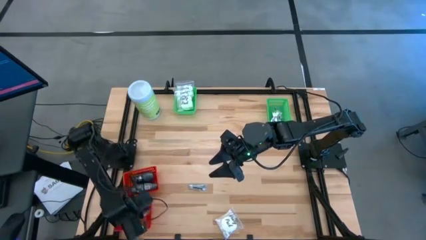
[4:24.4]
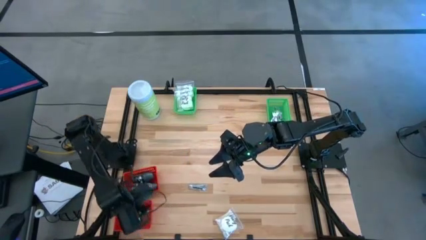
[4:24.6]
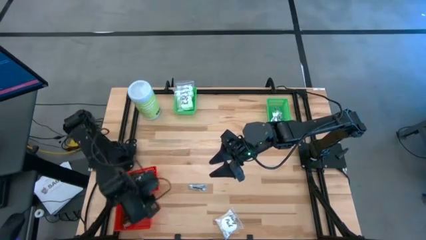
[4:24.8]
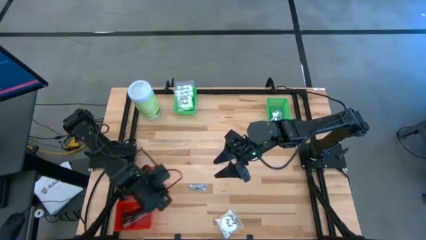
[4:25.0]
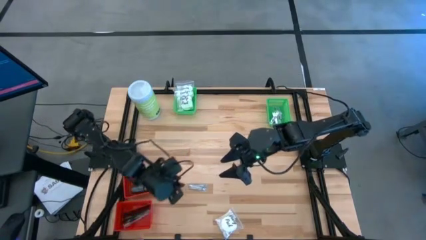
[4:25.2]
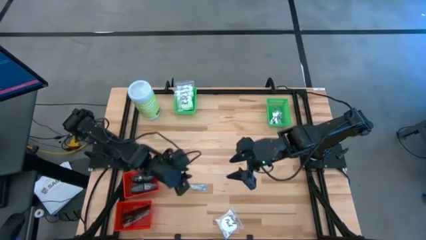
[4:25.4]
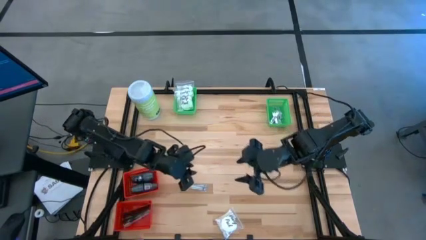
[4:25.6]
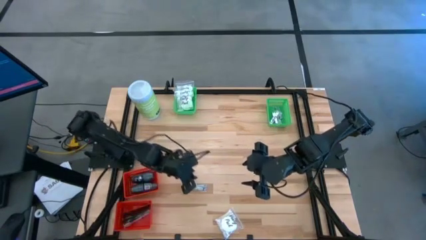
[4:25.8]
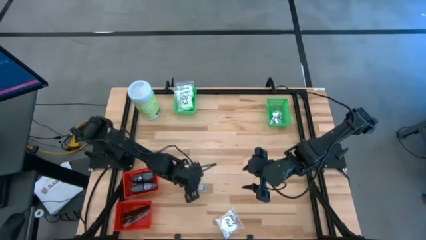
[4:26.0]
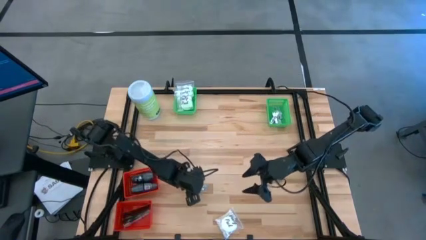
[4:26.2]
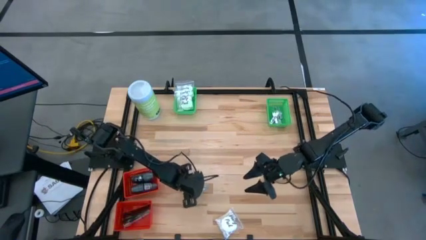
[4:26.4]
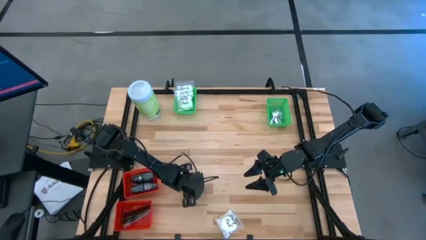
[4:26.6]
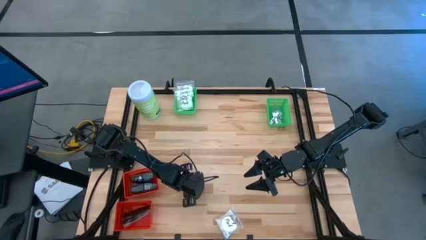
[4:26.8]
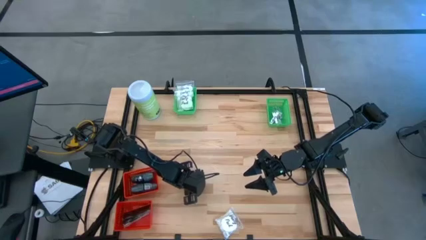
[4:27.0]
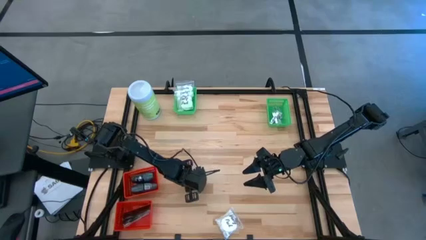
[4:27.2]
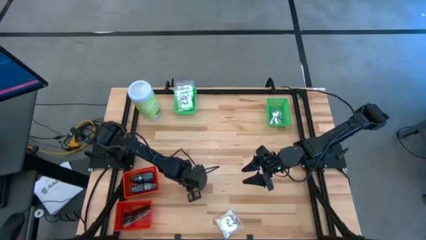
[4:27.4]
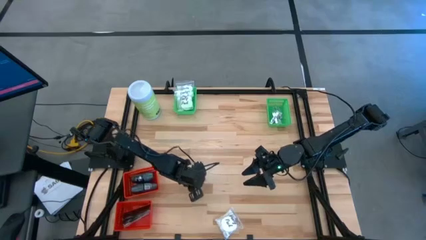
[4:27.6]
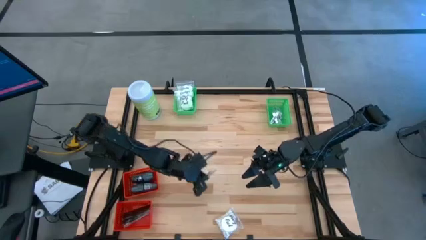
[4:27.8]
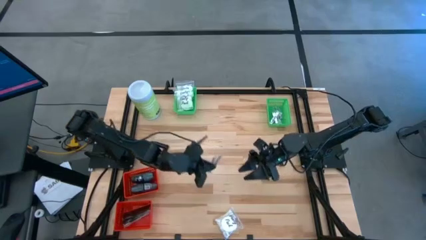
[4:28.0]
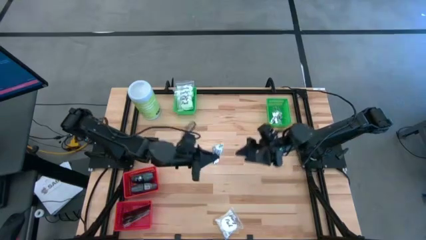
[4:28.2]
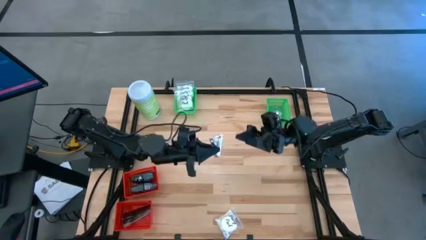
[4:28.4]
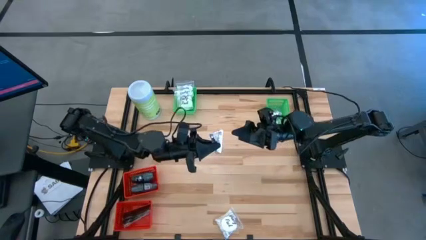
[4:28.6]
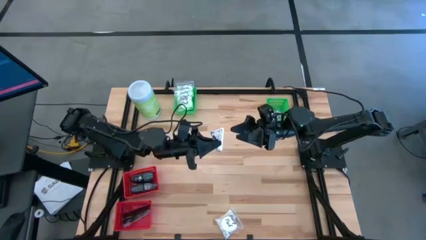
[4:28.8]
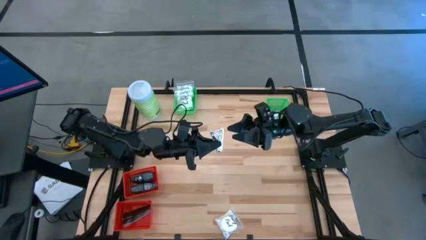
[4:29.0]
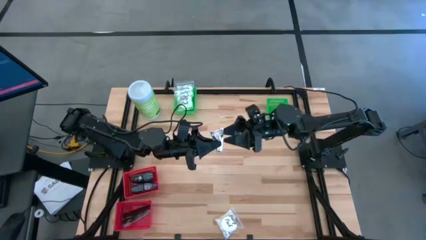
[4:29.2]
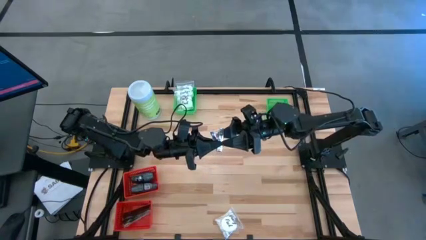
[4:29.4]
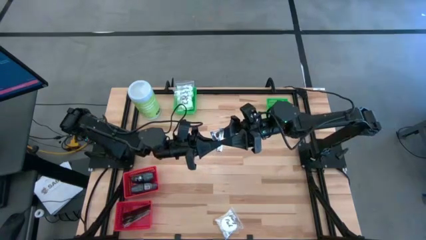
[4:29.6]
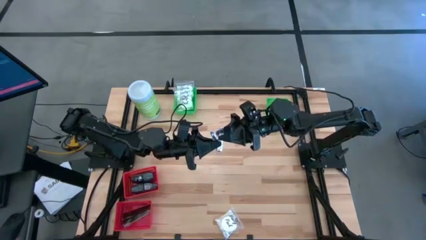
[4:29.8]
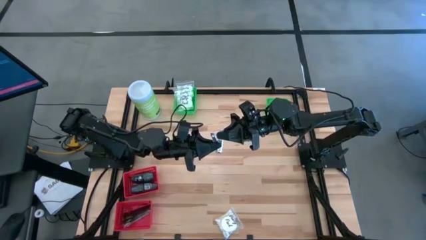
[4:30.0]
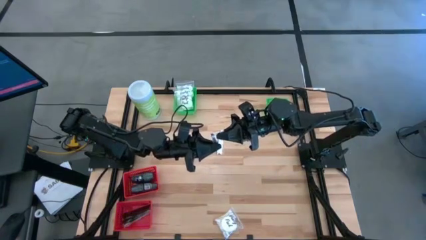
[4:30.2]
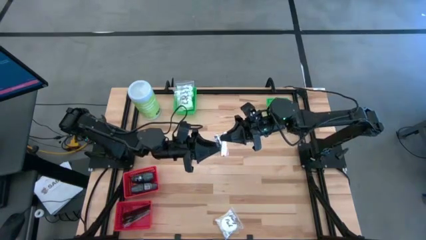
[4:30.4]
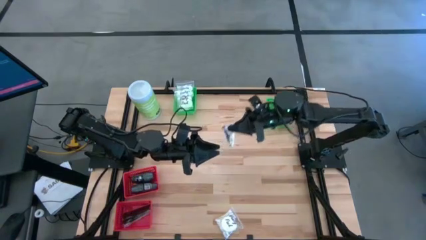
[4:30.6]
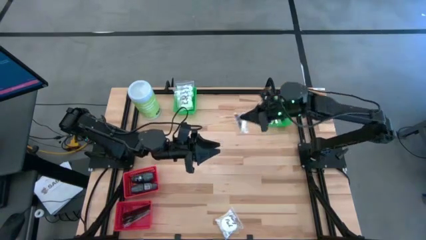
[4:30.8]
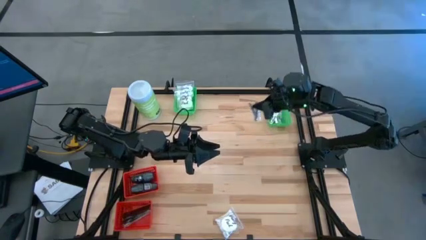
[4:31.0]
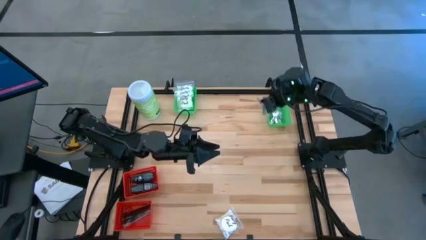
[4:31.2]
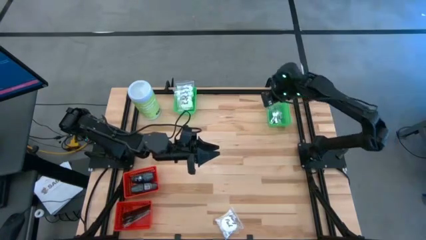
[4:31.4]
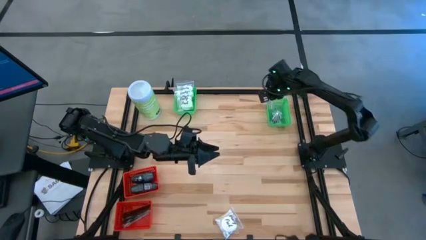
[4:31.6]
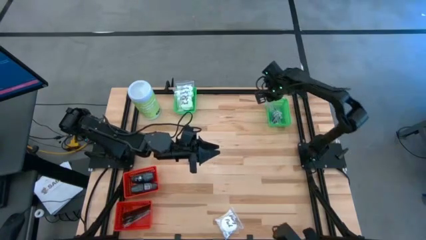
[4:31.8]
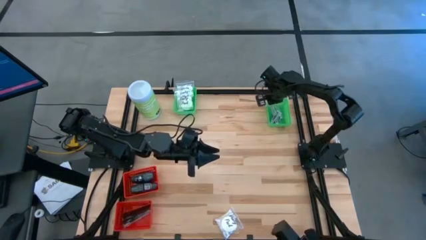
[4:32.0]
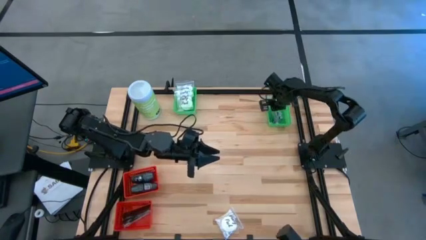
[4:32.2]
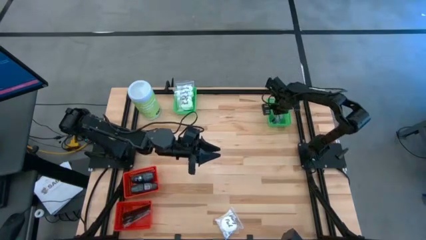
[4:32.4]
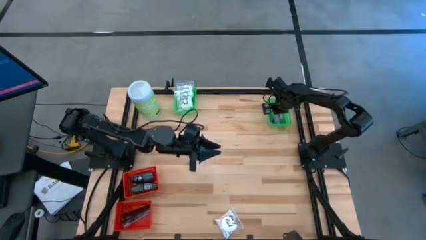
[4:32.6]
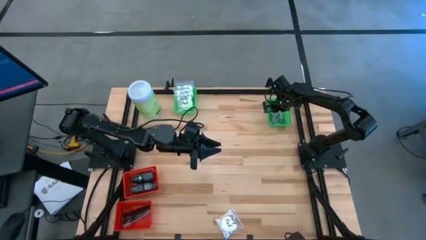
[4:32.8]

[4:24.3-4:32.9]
Task: Pick & Place Travel size toiletries
Put the silver nail cutter into the top right green basket

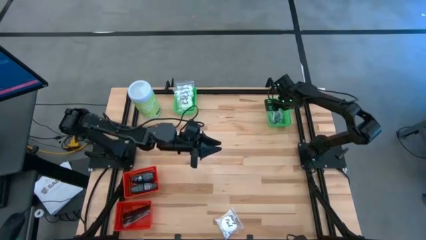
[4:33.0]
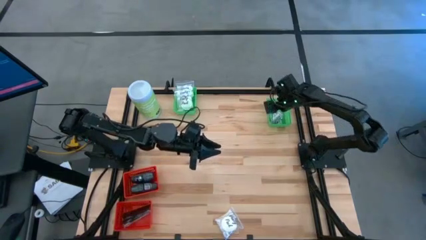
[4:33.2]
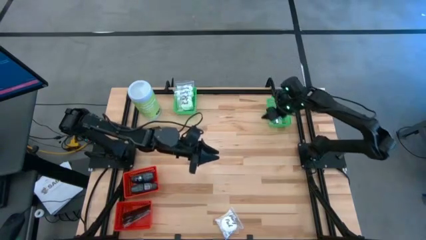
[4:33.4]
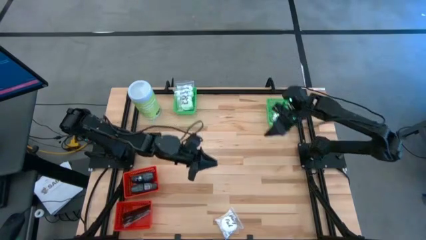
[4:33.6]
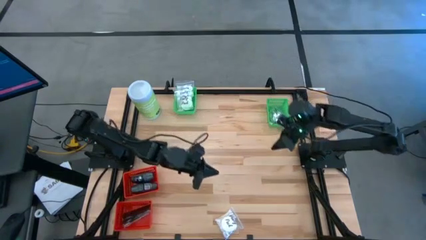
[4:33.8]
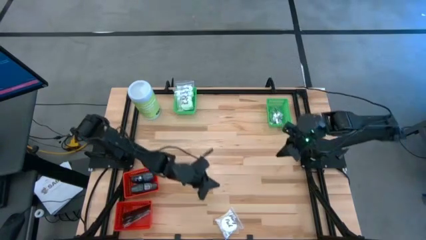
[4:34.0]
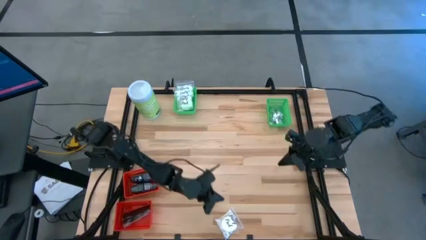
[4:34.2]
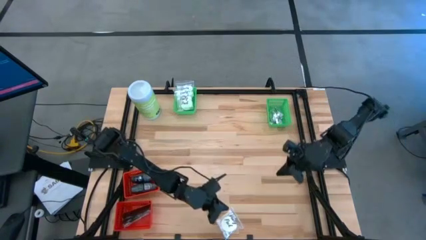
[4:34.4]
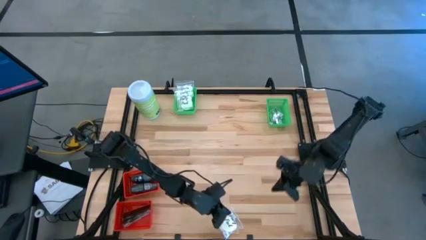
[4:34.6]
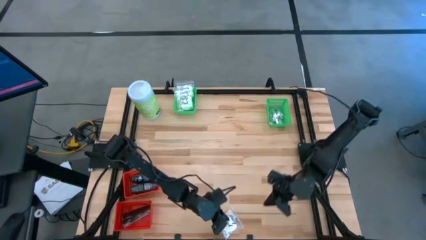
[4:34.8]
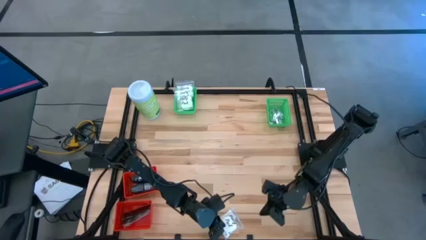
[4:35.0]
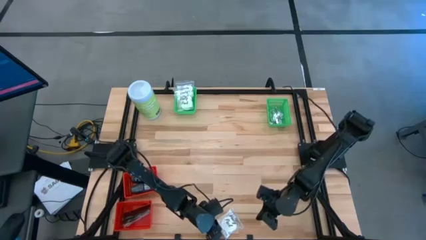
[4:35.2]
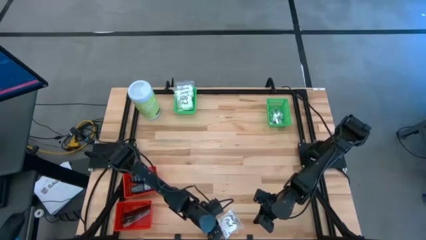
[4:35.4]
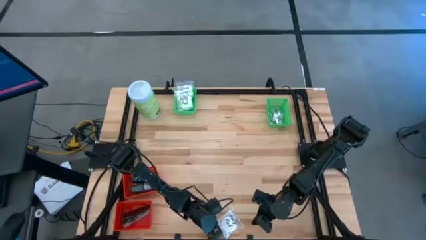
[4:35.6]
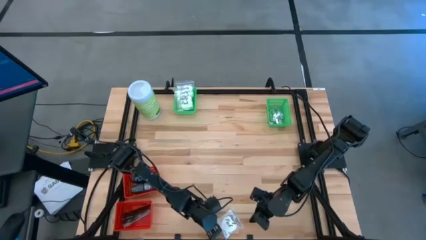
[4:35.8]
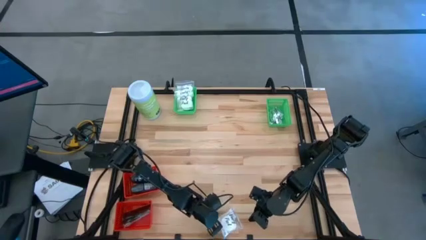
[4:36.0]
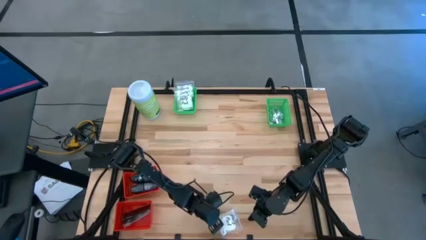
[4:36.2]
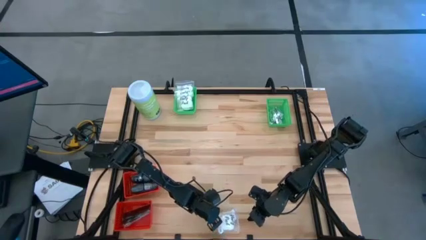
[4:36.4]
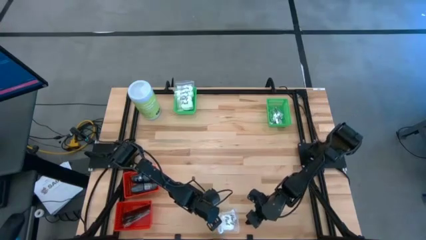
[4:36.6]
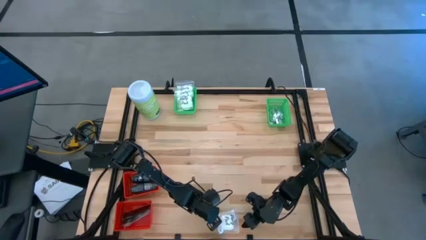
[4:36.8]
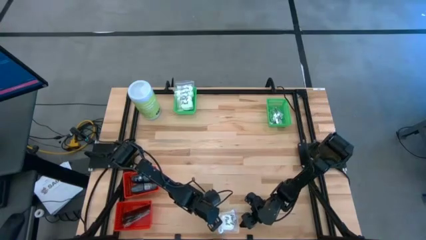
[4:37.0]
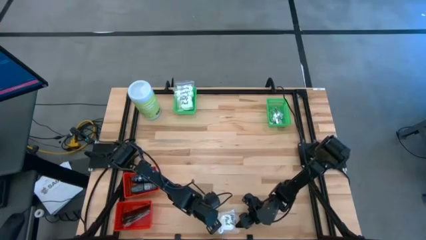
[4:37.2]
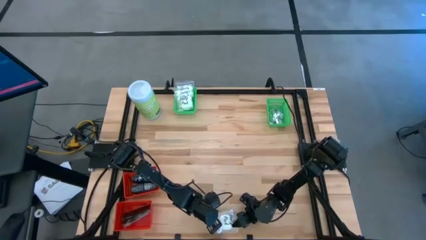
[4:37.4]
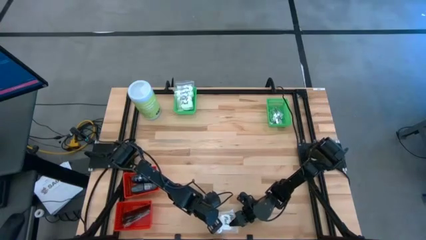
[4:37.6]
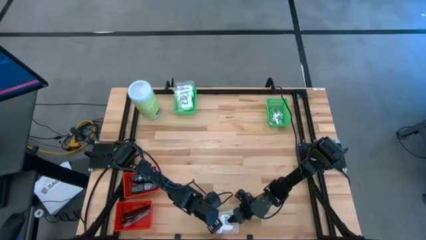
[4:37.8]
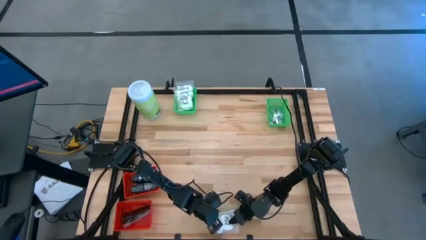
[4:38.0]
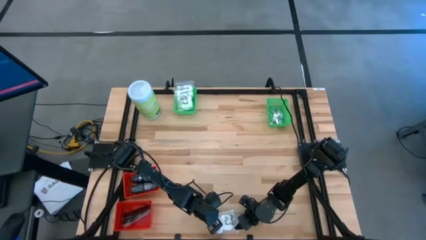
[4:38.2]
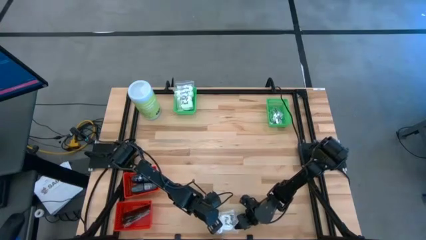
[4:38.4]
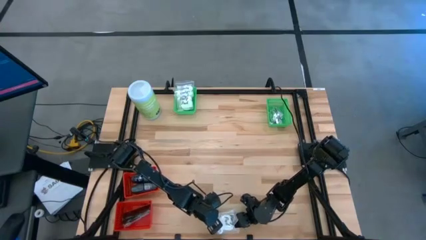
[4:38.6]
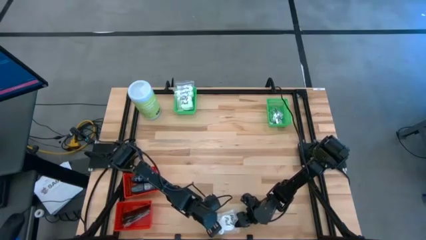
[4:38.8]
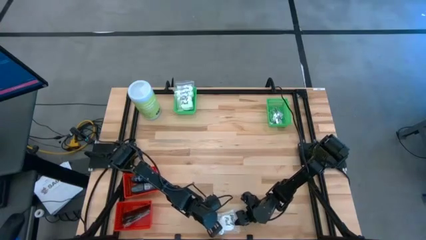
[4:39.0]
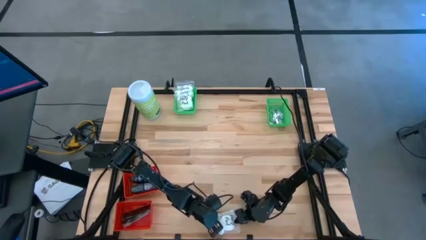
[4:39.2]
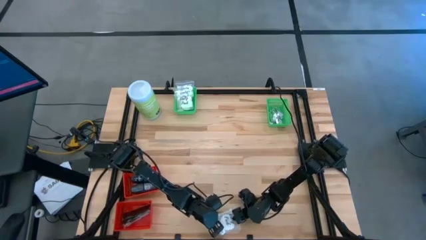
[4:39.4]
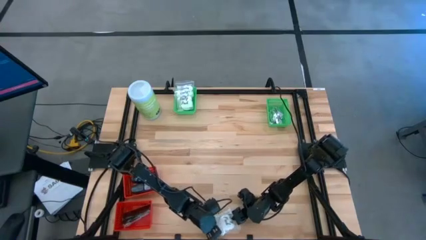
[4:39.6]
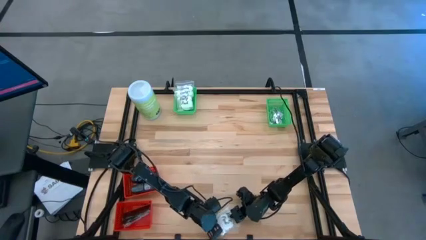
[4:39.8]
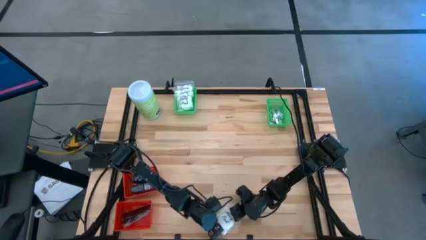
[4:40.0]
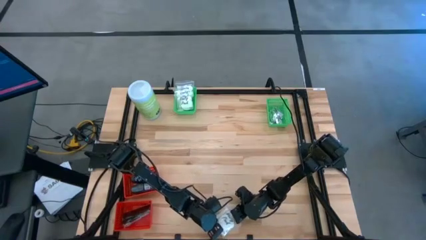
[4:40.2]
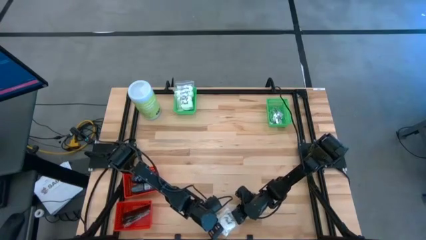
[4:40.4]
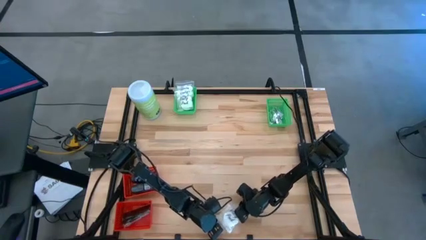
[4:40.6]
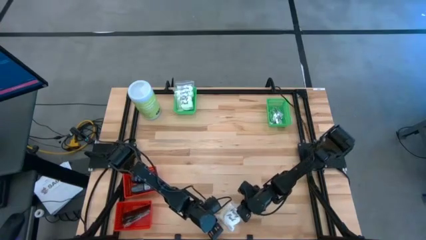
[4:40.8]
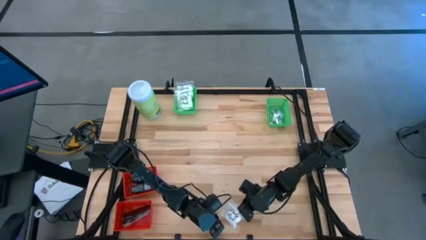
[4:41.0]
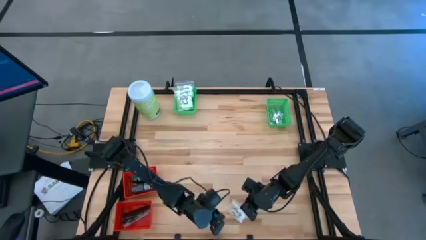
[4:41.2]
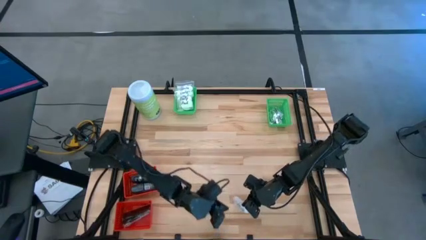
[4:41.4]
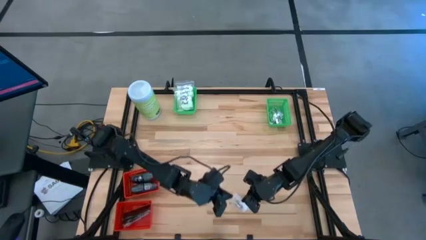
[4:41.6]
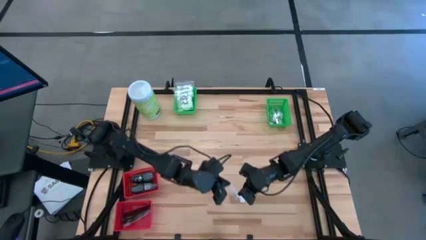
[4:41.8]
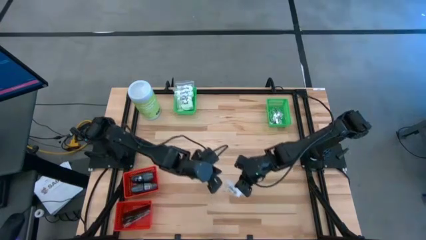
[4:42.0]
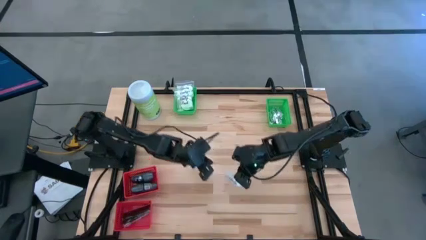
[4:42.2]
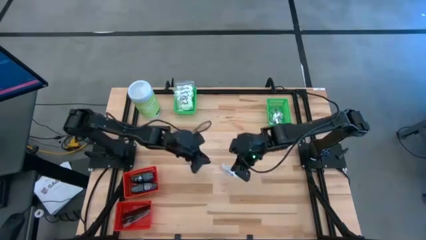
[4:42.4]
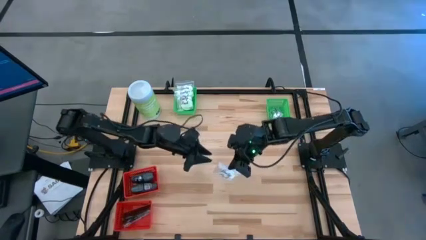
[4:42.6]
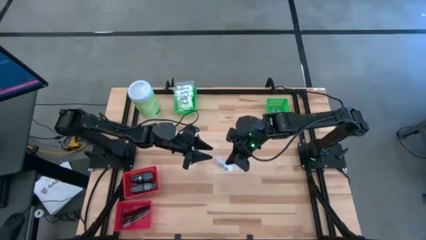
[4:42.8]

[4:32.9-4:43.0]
Put the white vanity pack into the top left green basket
